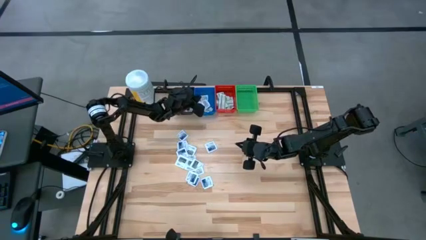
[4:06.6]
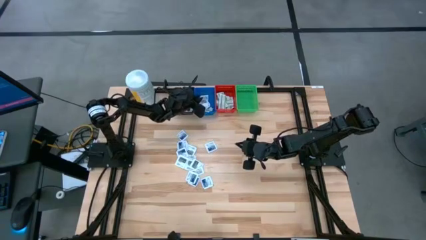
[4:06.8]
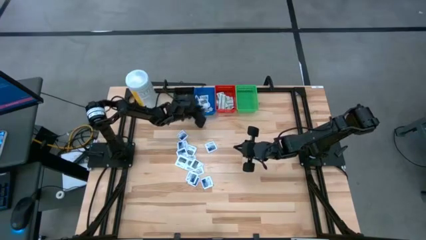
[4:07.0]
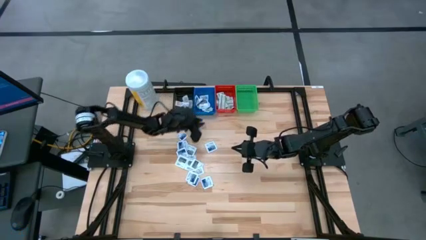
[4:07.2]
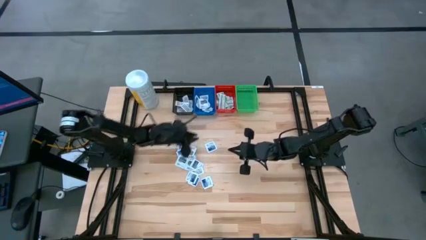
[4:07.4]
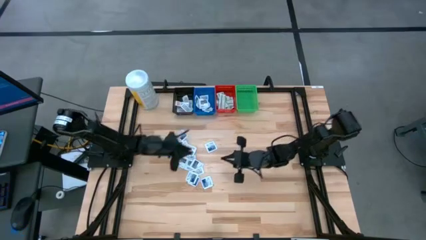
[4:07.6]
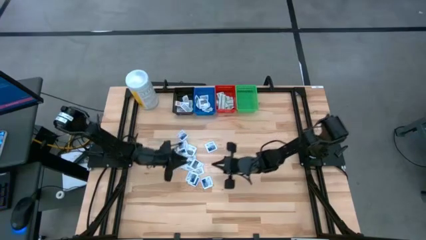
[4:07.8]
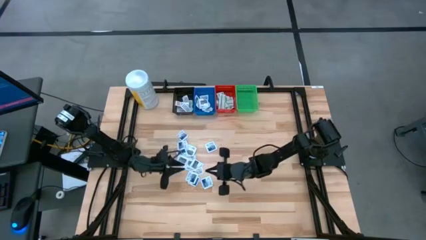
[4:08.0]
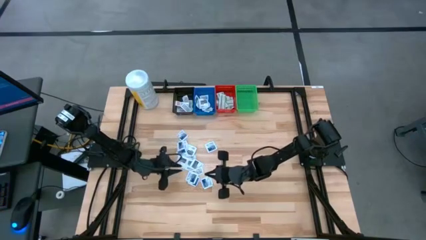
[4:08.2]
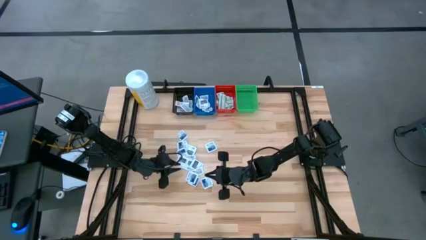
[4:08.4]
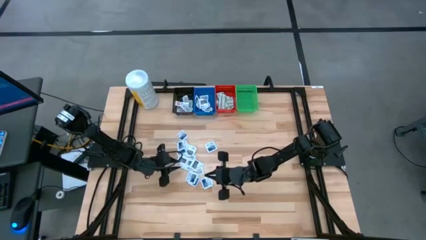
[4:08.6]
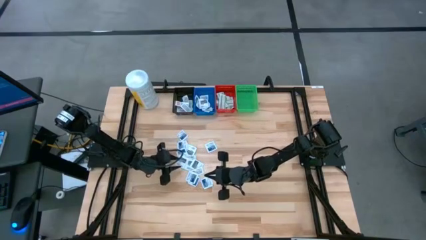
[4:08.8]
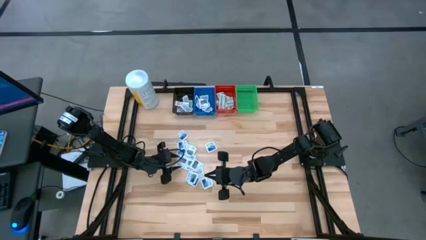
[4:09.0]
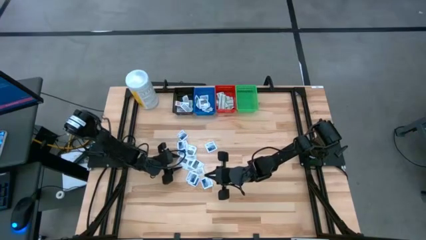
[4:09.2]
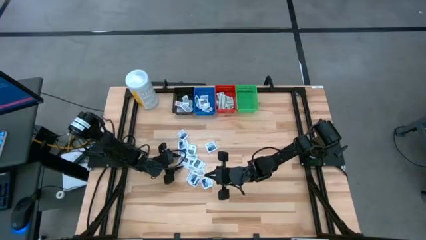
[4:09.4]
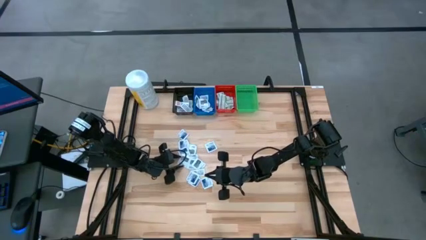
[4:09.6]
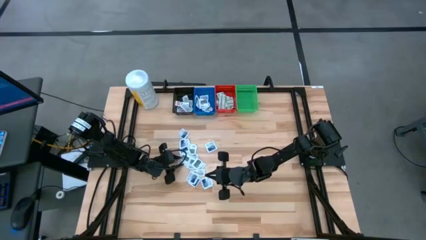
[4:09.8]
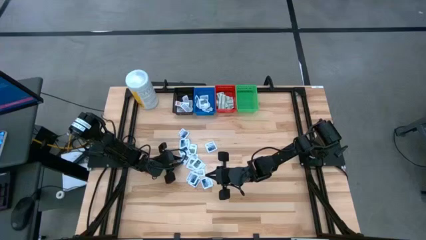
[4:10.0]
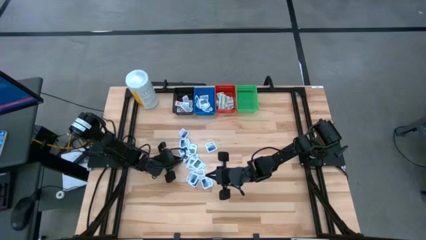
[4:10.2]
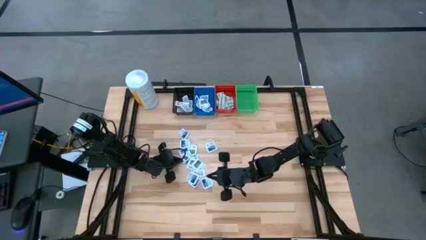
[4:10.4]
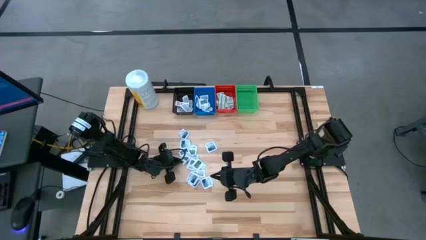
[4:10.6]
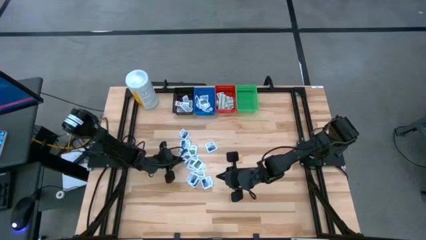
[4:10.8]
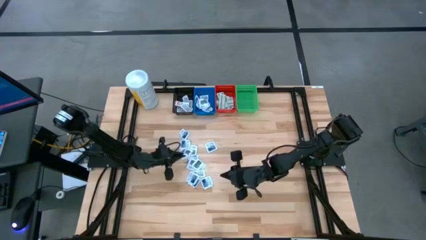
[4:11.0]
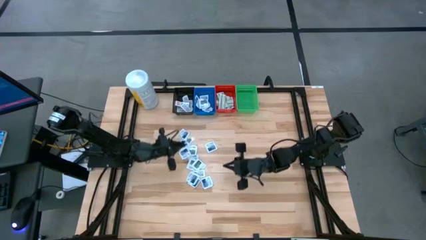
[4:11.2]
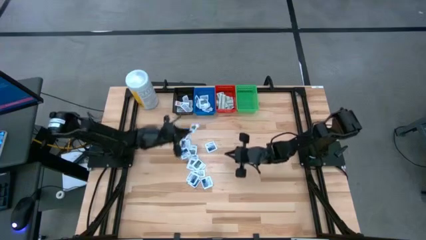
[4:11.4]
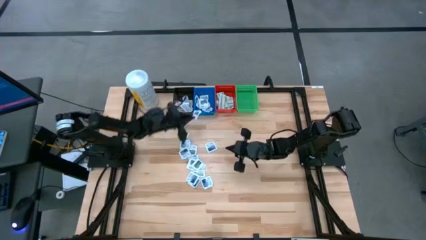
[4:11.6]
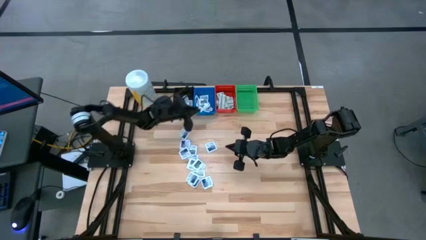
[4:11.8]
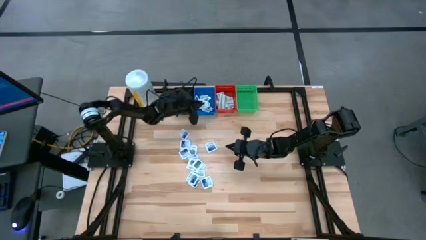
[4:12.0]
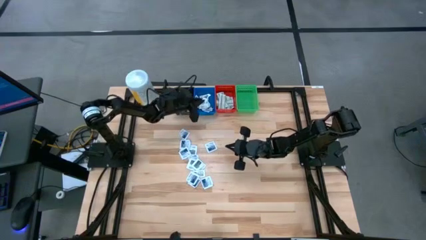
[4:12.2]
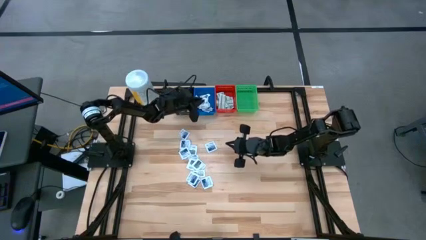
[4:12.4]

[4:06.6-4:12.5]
Task: Pick & Place First Aid Supplies
Put the gray towelette pack into the blue bin

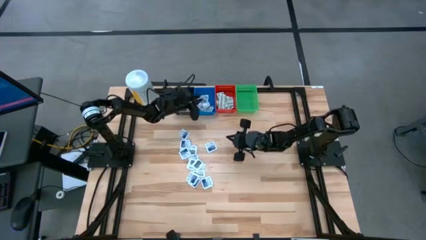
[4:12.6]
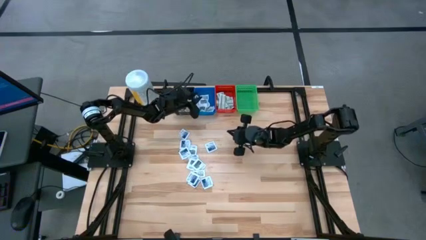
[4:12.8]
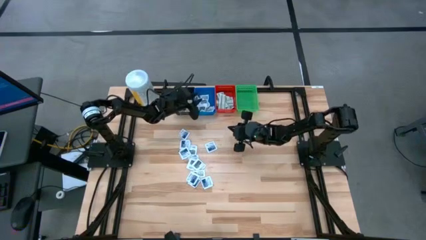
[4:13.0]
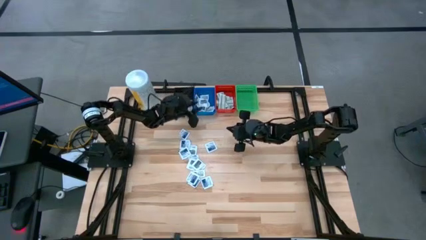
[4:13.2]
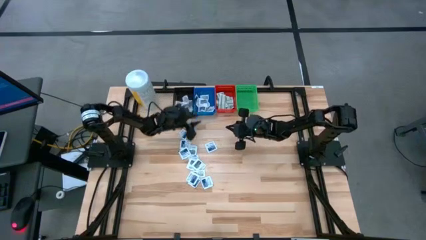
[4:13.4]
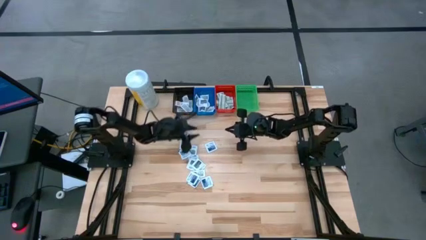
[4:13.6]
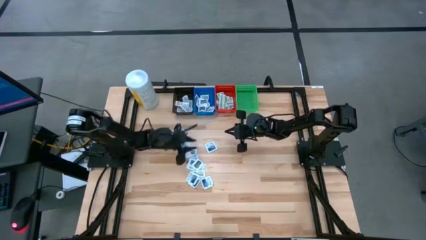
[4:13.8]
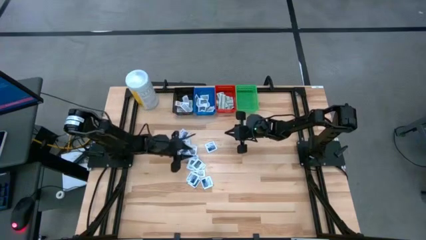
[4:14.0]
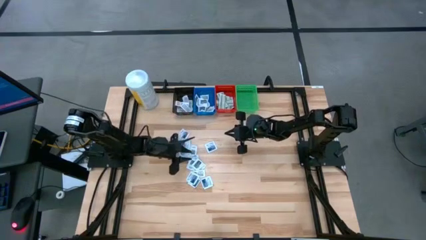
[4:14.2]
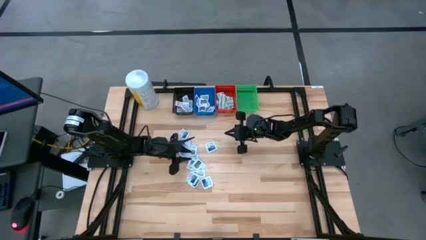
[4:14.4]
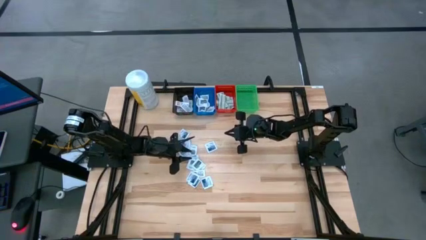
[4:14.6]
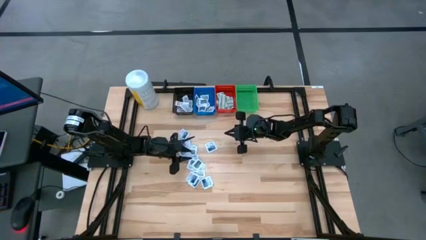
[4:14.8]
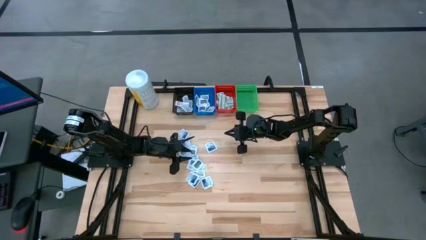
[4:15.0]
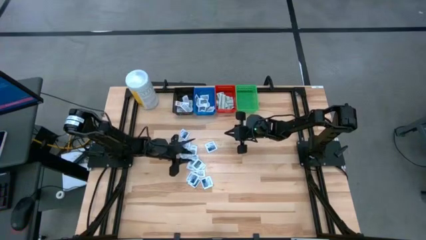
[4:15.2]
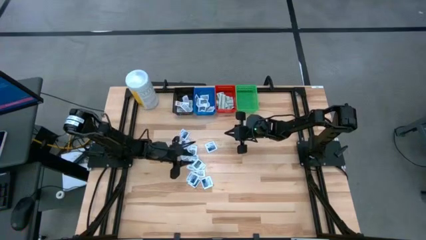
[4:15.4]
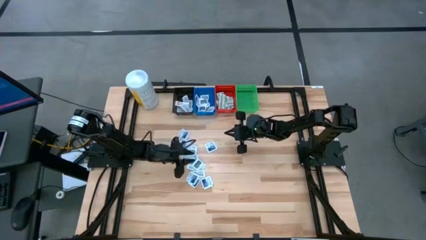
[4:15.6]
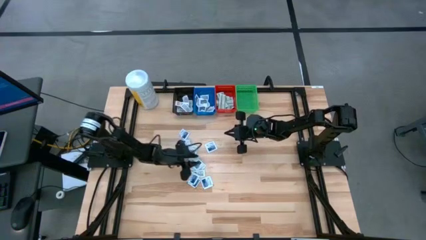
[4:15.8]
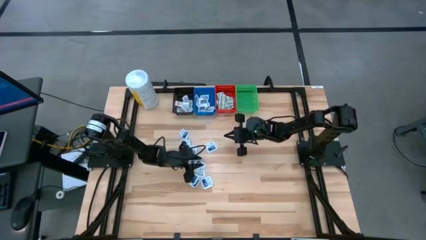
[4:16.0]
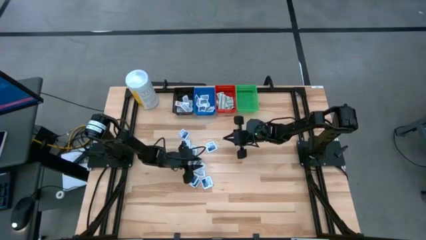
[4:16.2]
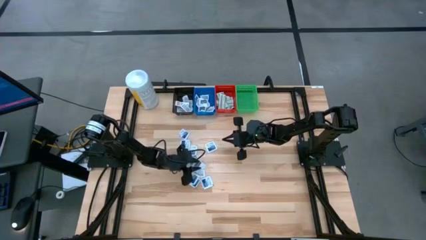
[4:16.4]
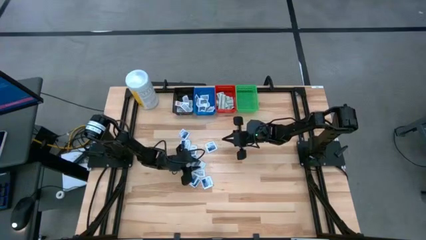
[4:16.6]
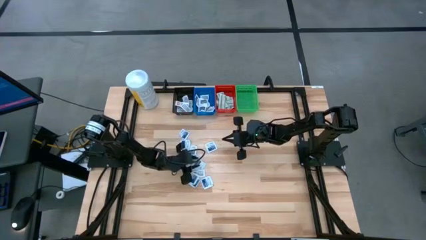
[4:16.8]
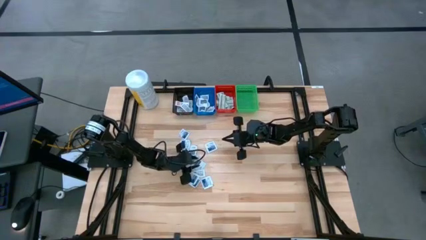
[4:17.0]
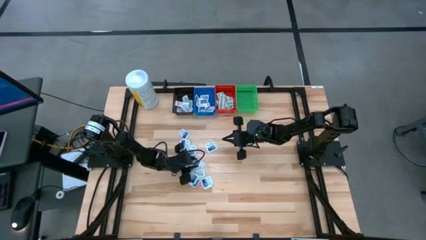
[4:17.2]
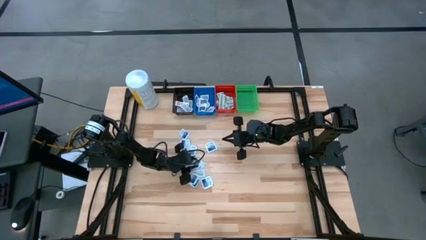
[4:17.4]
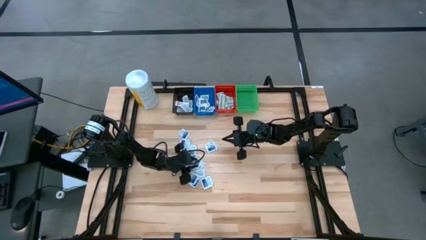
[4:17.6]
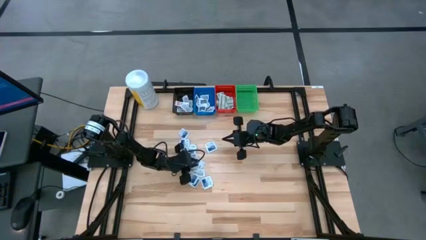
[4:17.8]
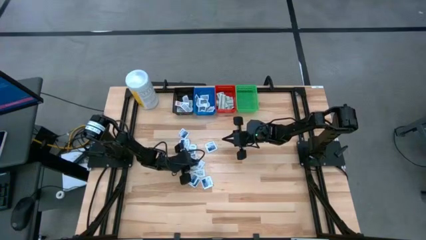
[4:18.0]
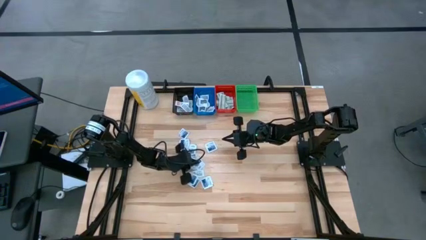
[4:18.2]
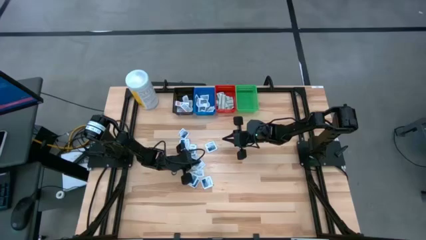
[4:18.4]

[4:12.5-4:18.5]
Put the gray towelette pack into the blue bin

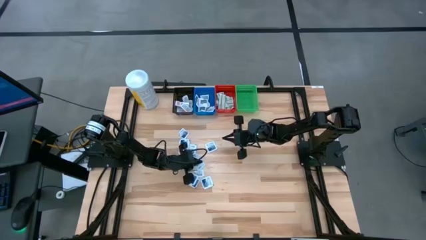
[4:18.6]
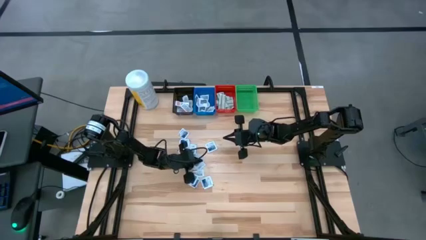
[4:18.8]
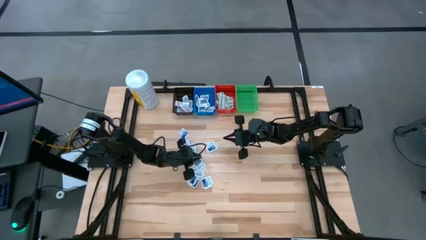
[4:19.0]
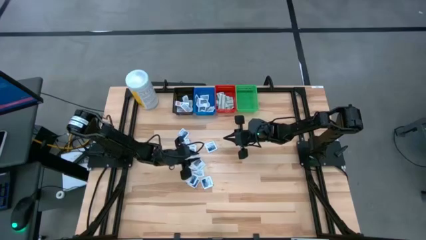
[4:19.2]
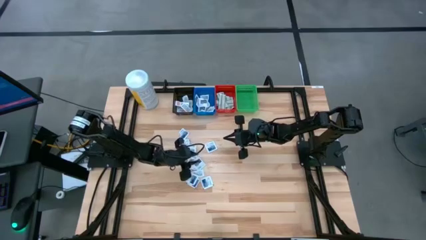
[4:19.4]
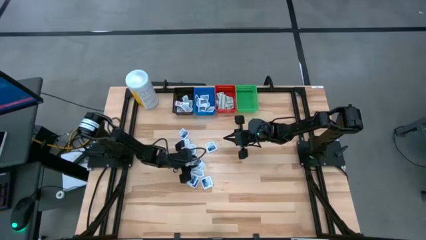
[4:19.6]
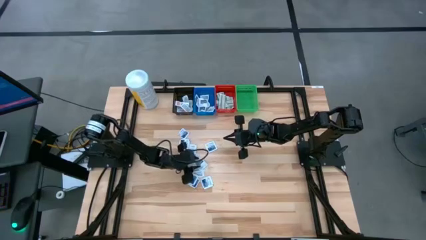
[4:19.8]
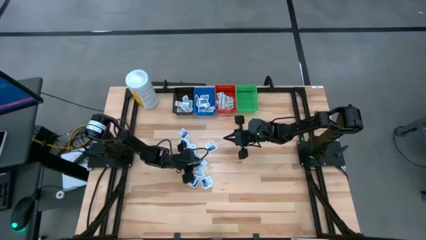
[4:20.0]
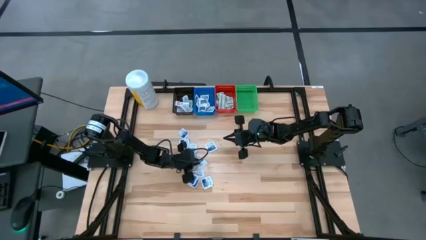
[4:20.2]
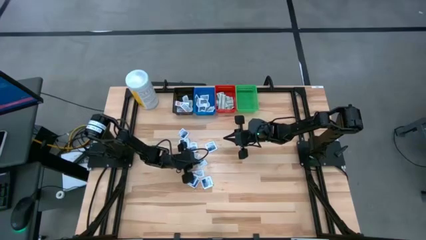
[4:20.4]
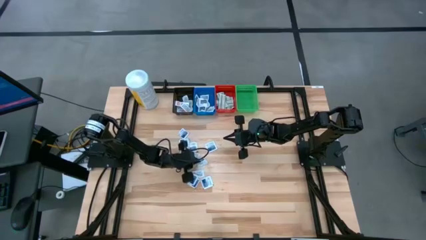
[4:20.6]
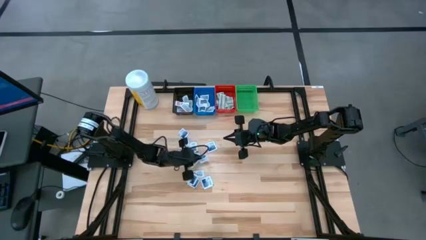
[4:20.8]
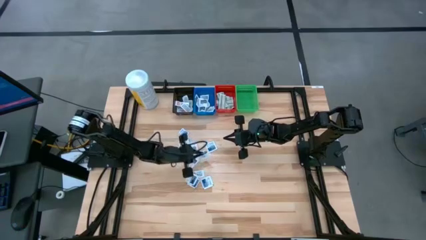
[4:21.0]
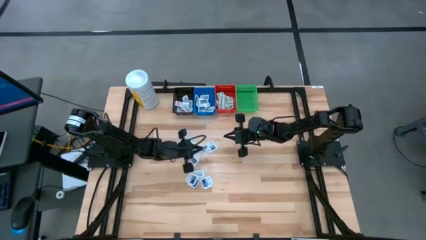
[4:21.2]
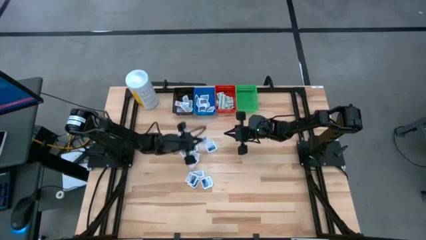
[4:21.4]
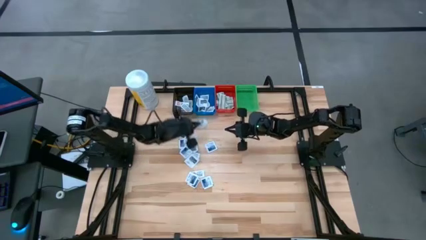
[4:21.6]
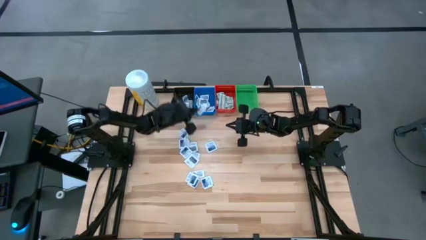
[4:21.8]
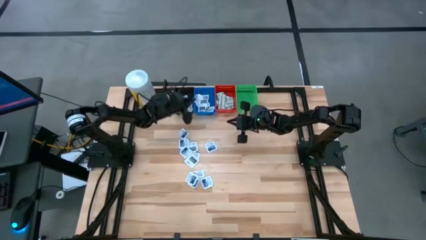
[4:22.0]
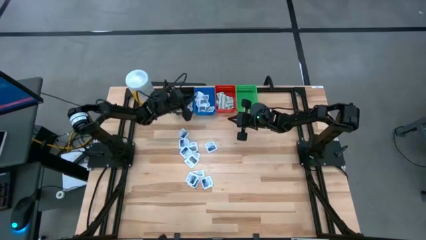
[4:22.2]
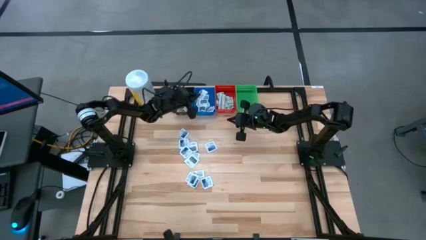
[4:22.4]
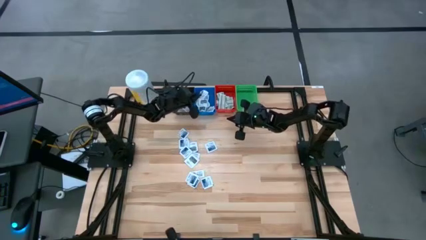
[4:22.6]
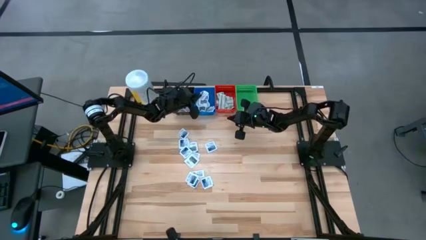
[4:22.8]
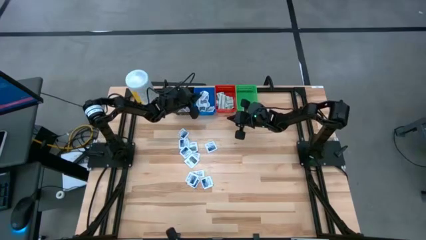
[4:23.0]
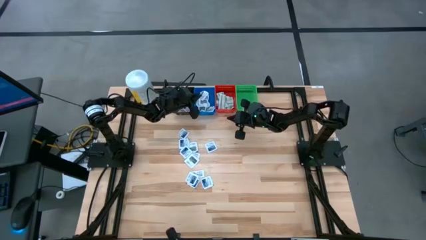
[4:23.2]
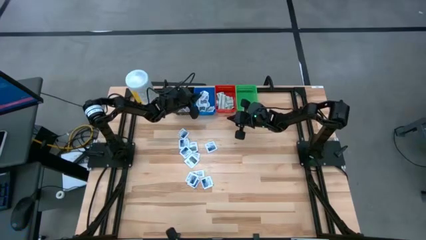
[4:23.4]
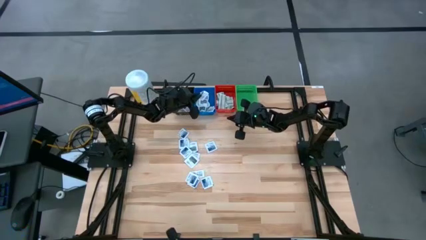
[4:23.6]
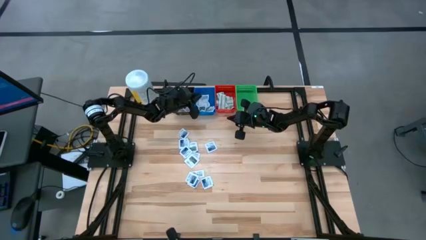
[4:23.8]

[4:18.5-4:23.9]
Put the gray towelette pack into the blue bin
